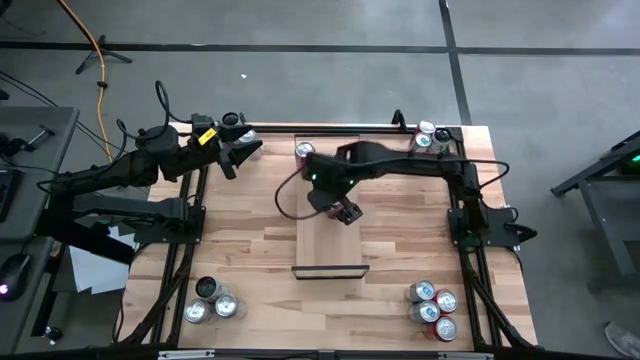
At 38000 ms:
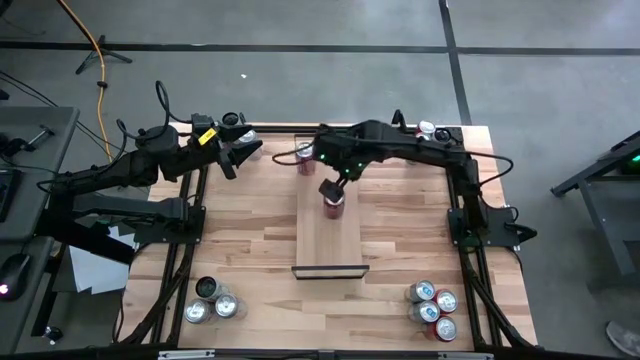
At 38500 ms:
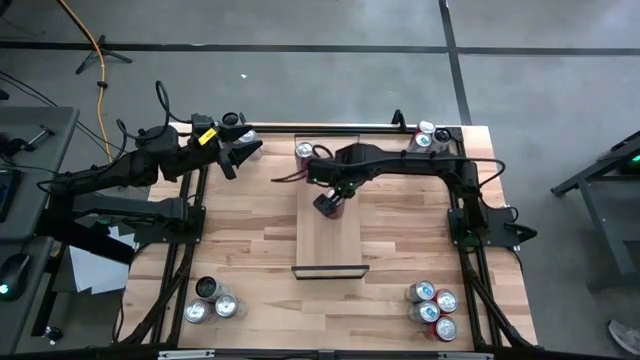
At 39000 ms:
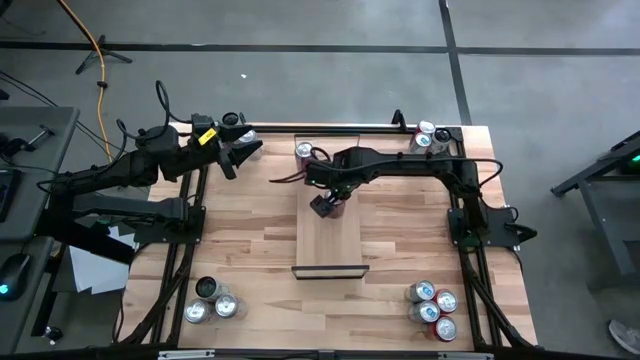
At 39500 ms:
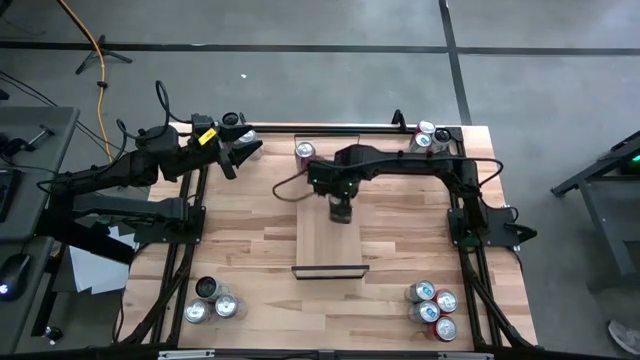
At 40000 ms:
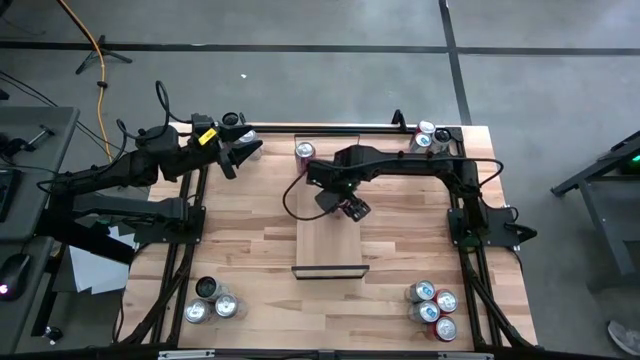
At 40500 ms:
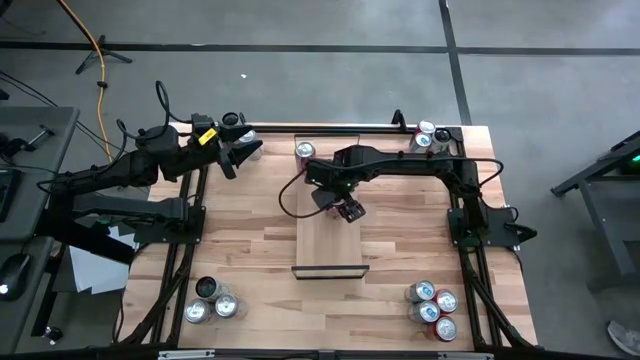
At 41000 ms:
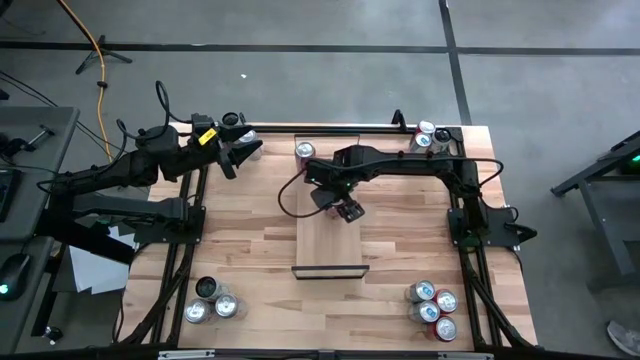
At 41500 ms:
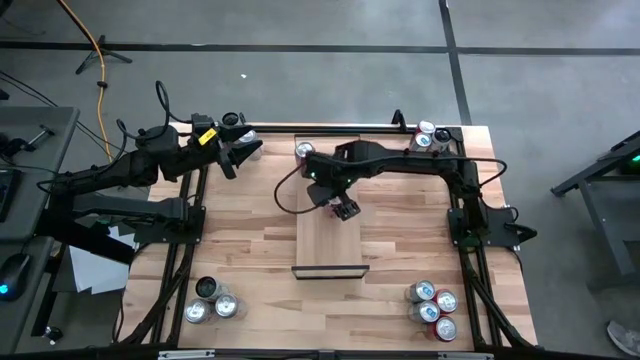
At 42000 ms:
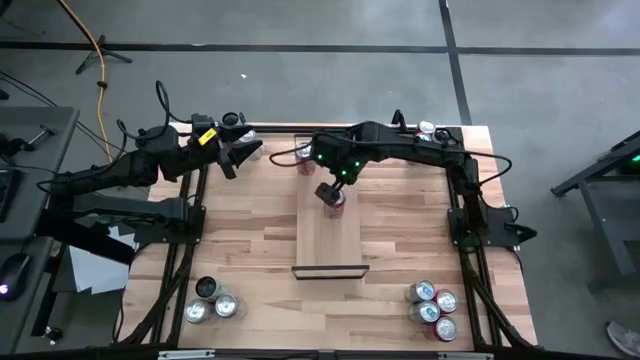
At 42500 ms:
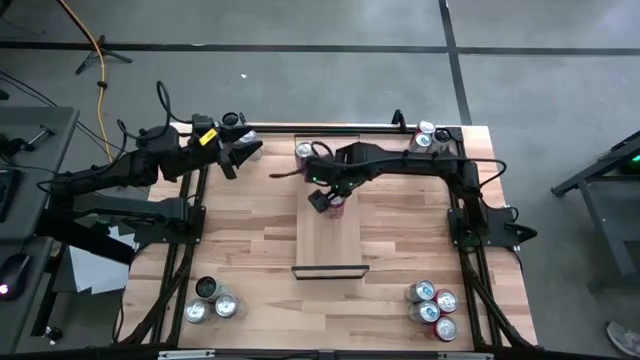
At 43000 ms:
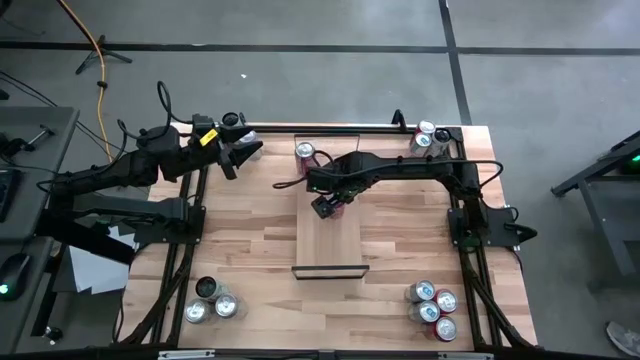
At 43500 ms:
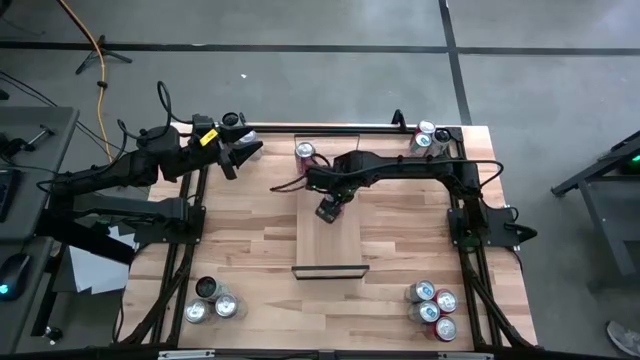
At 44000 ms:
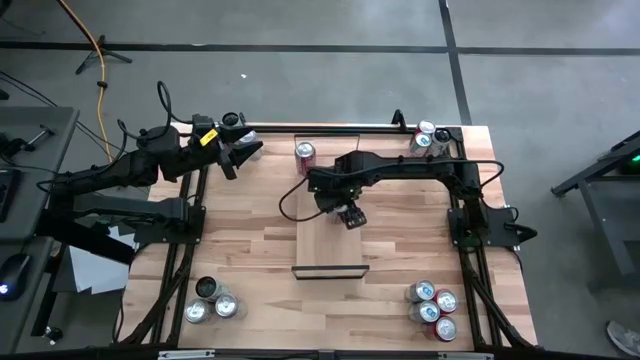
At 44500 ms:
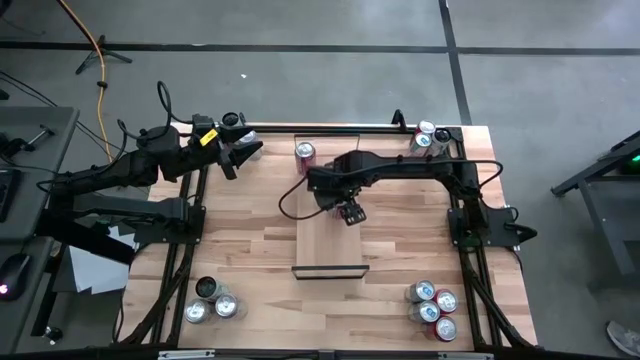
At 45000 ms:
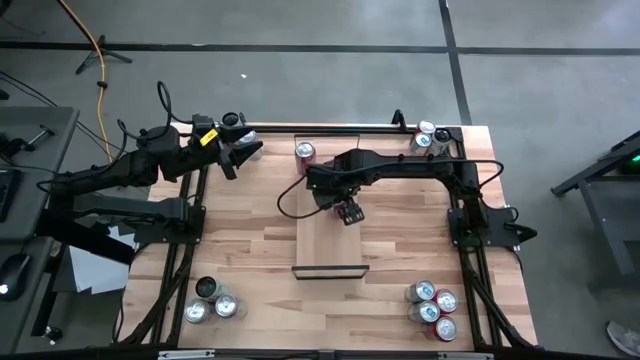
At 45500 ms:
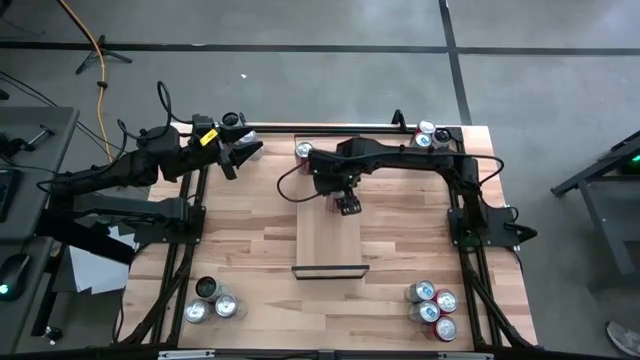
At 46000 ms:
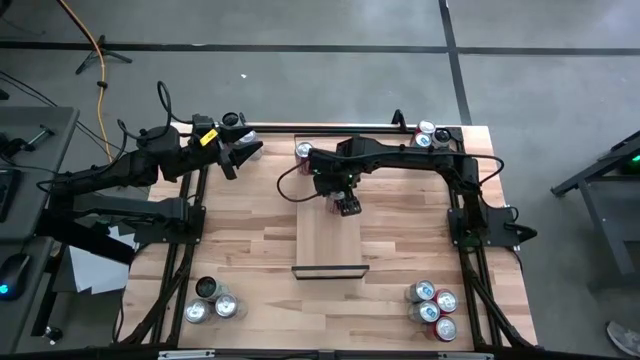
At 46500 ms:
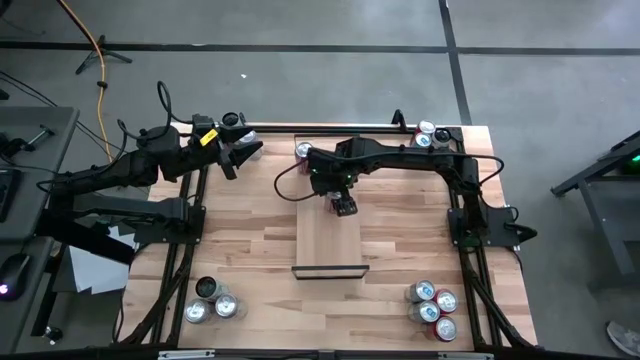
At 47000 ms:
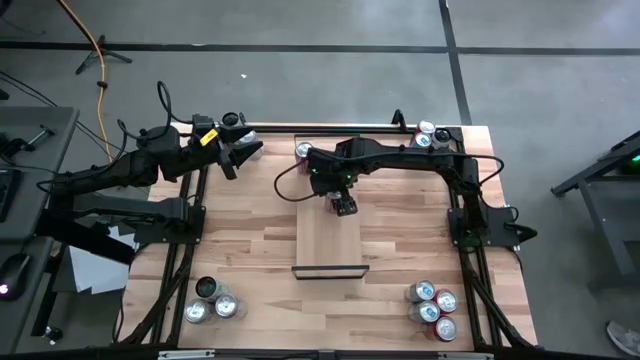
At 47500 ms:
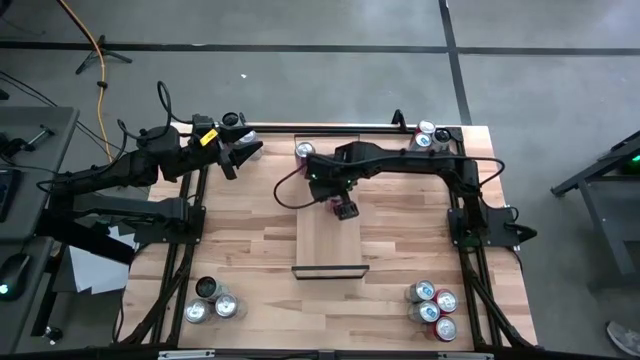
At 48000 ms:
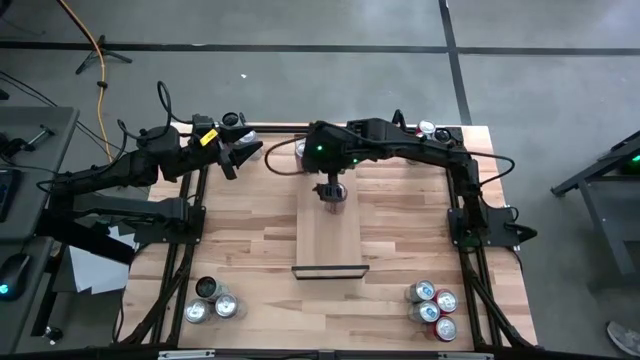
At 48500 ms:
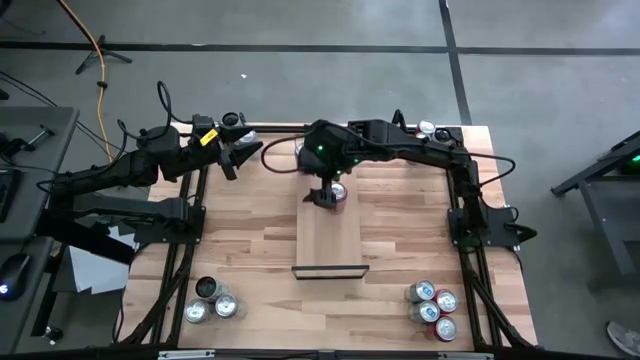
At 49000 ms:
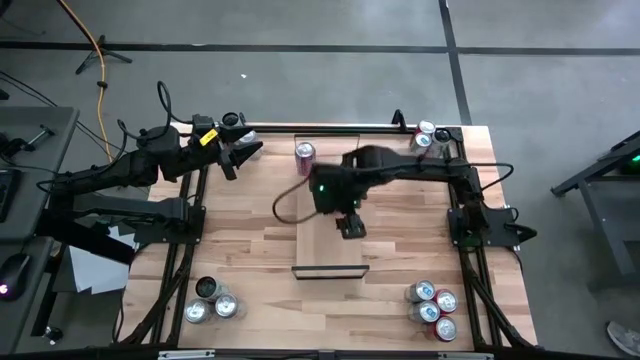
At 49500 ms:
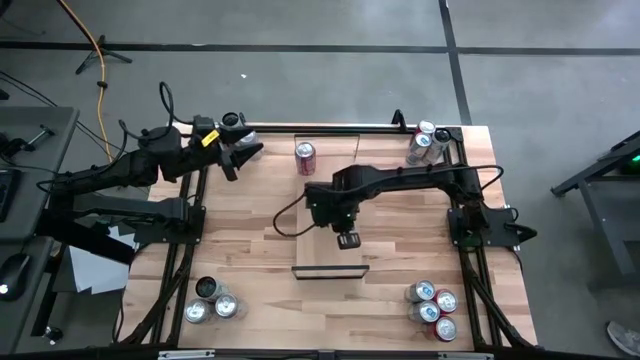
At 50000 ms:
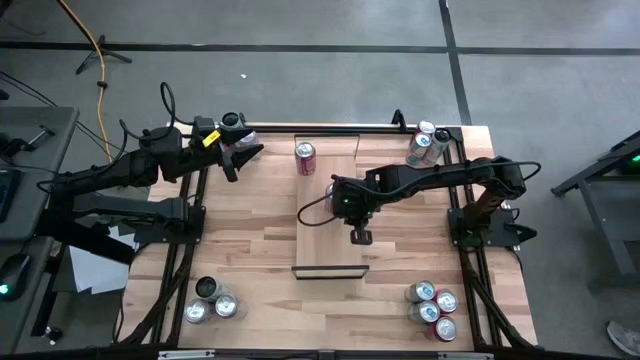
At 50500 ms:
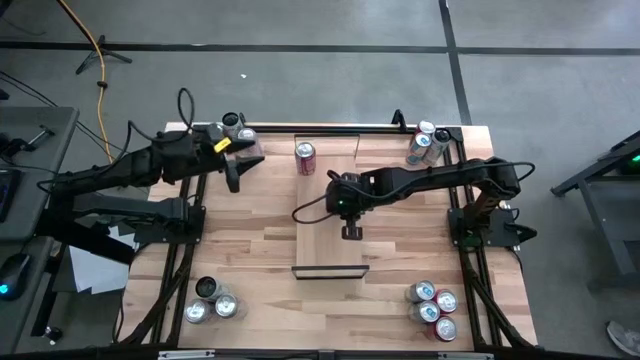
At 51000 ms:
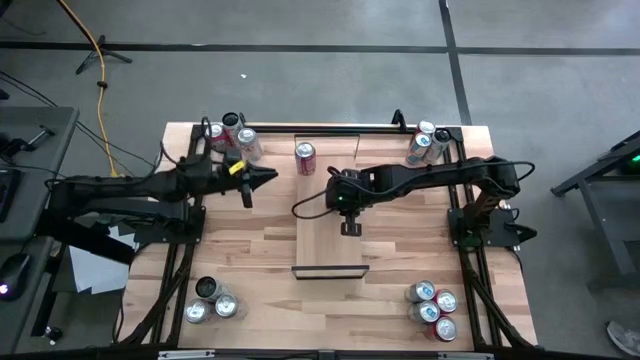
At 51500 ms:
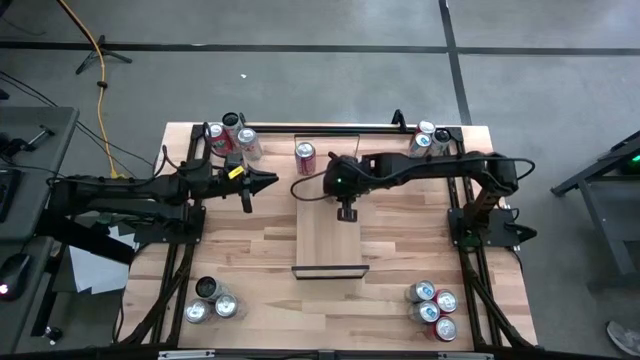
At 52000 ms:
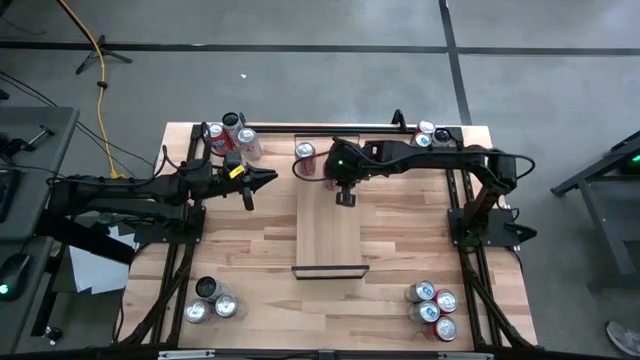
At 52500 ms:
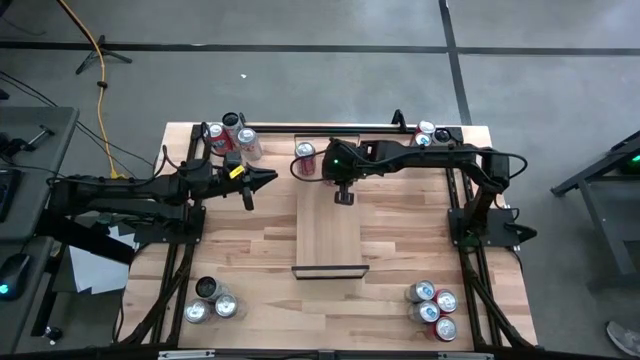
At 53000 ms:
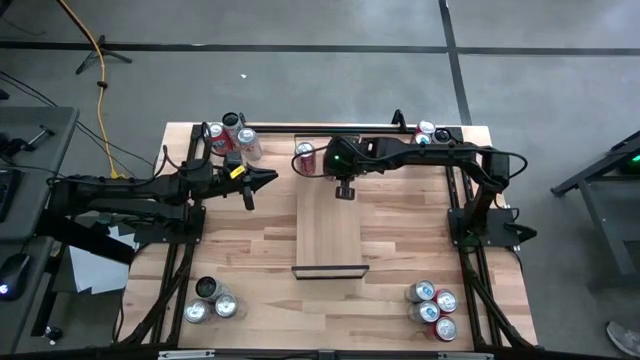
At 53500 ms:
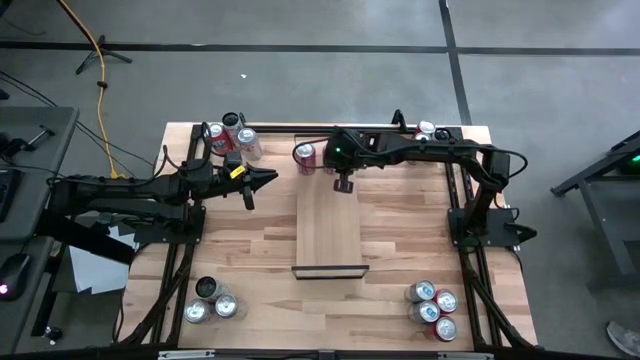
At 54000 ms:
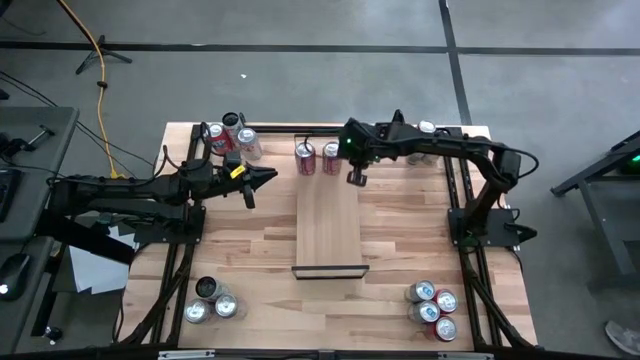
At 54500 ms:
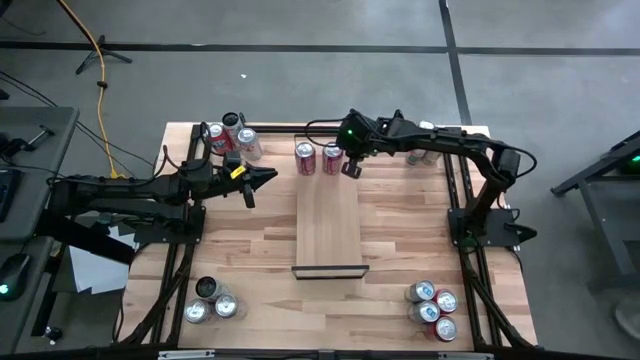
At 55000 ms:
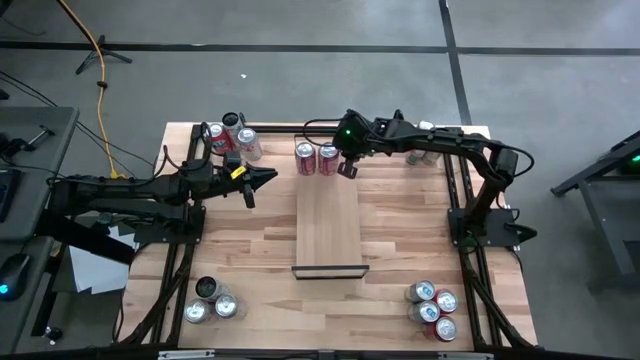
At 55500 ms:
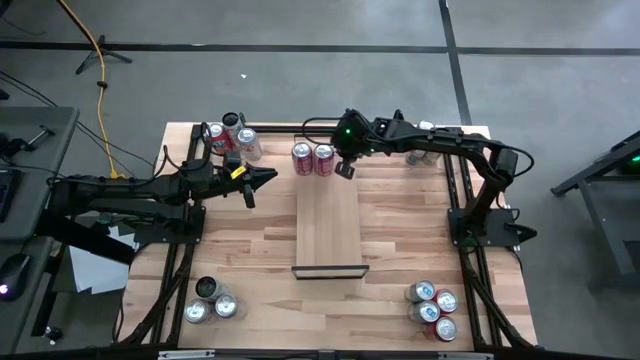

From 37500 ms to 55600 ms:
Task: Place canned beverage on shelf
Put the red soda can on the shelf aligned with the other red soda can

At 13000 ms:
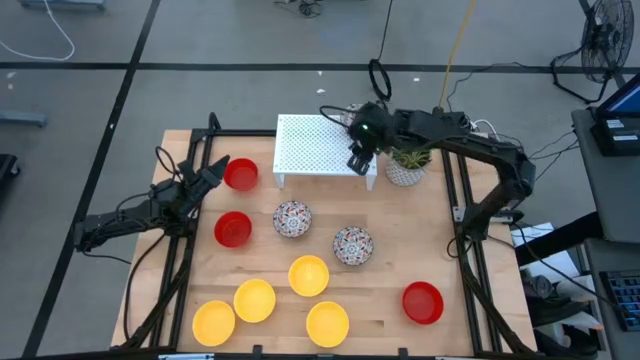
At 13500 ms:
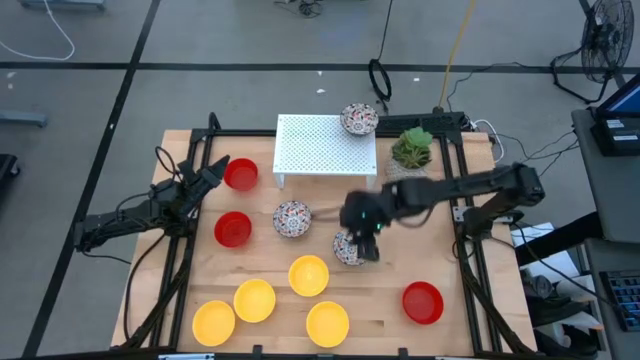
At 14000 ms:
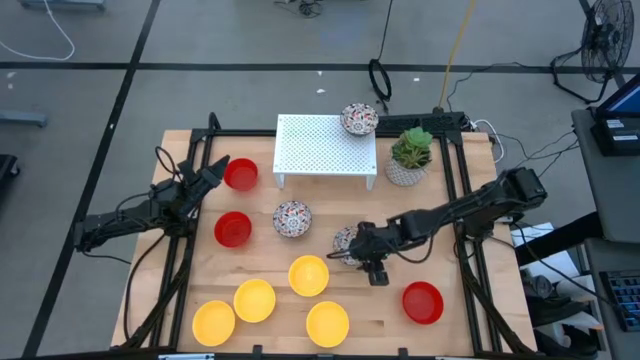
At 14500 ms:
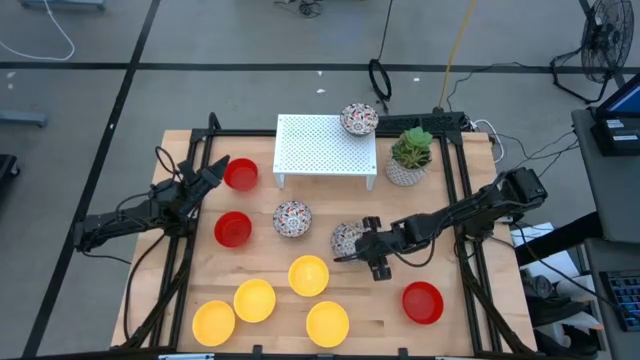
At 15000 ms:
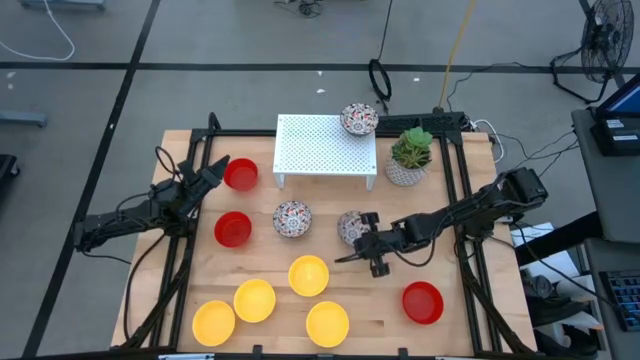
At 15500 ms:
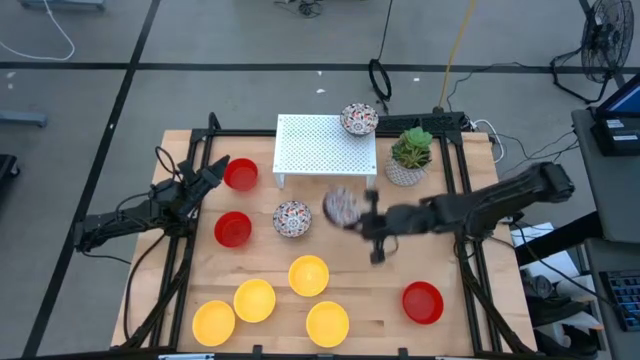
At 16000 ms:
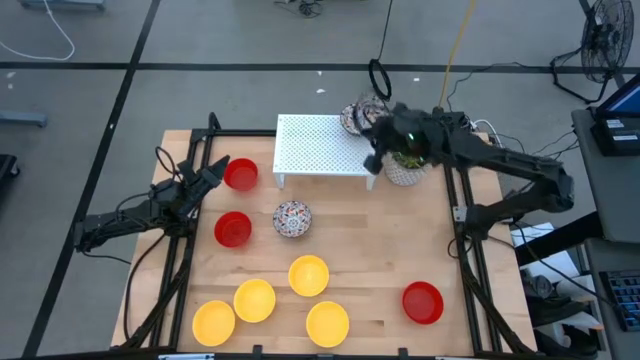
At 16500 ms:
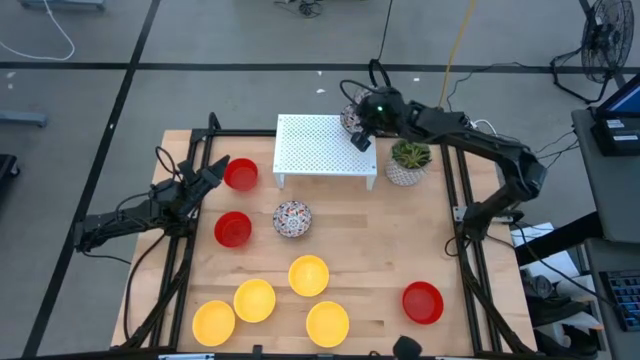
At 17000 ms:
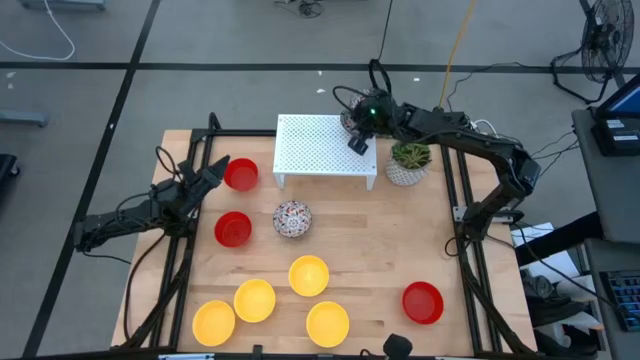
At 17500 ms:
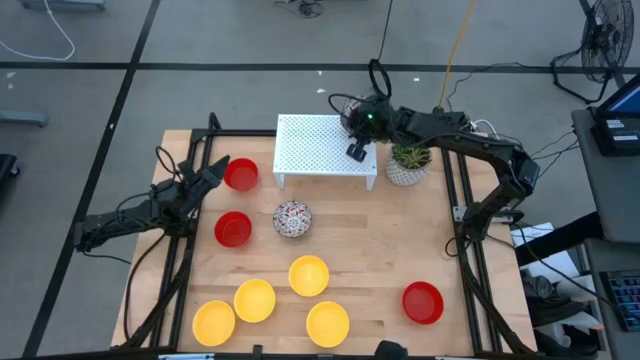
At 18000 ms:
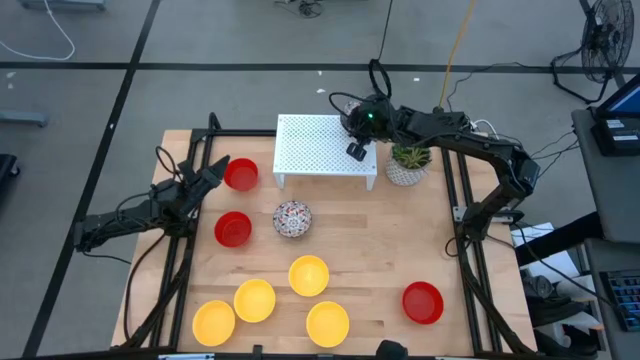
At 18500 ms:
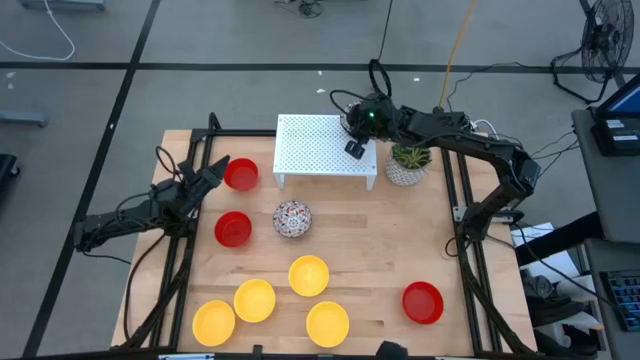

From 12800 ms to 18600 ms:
Task: Pick & Place Mini bowls
Stack the white patterned bowl on the white patterned bowl on the shelf
